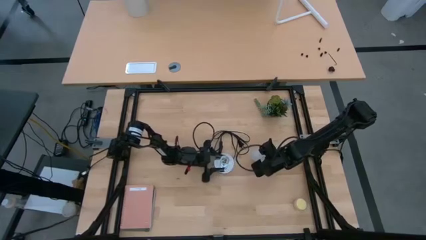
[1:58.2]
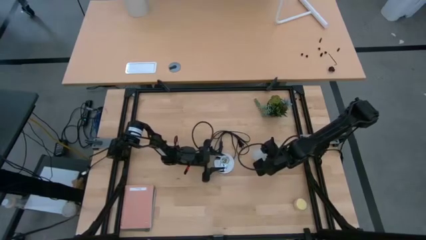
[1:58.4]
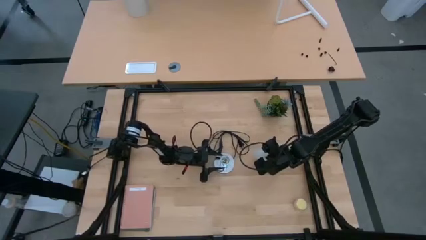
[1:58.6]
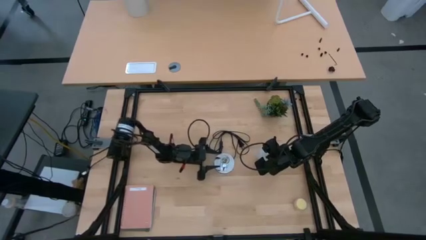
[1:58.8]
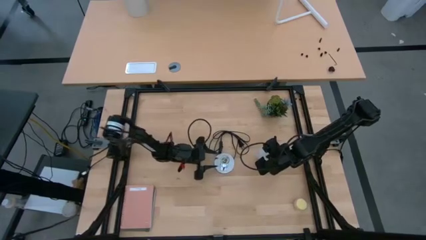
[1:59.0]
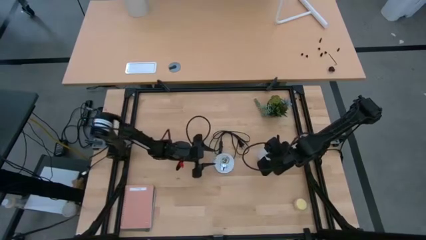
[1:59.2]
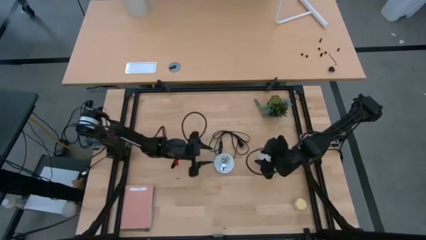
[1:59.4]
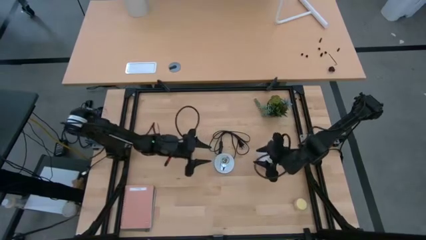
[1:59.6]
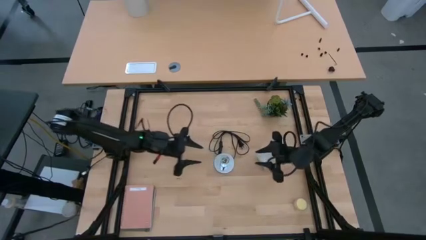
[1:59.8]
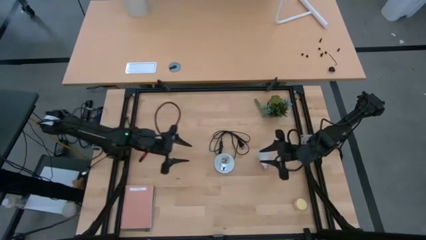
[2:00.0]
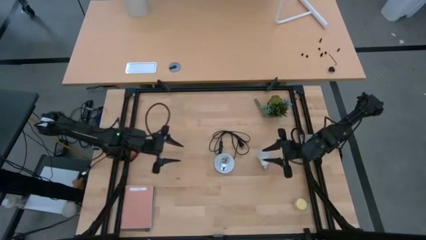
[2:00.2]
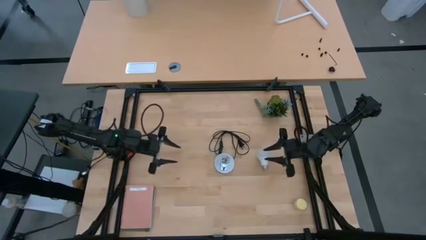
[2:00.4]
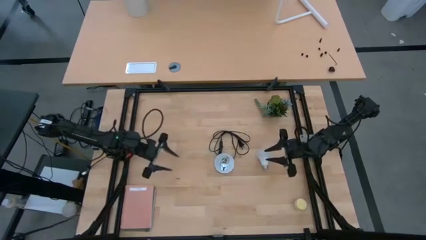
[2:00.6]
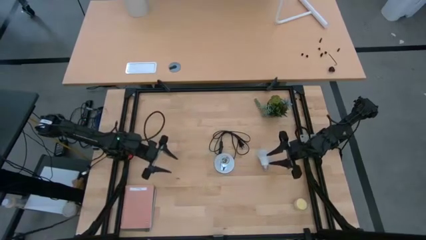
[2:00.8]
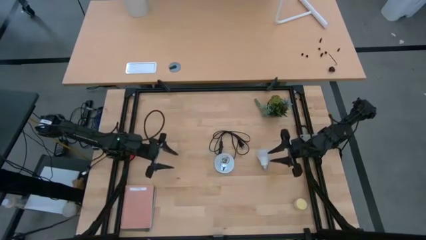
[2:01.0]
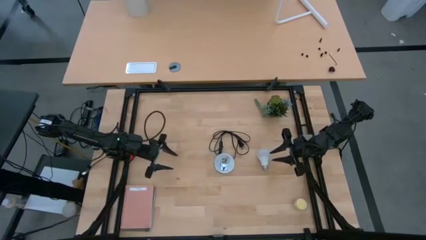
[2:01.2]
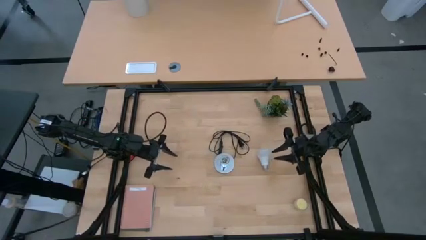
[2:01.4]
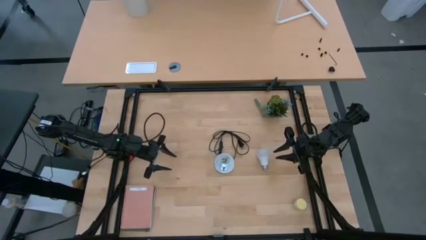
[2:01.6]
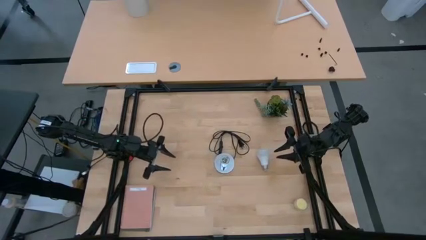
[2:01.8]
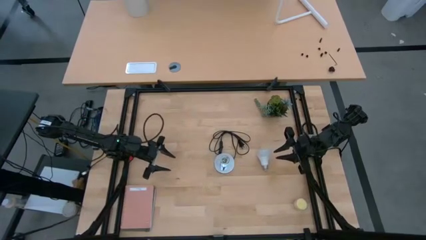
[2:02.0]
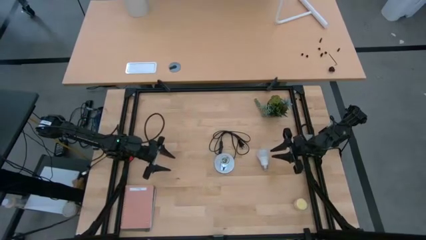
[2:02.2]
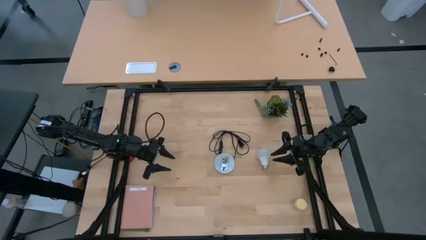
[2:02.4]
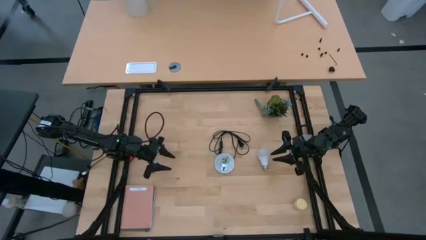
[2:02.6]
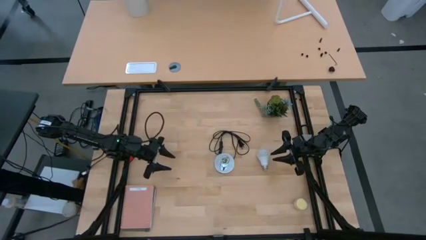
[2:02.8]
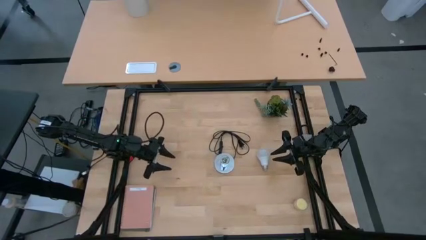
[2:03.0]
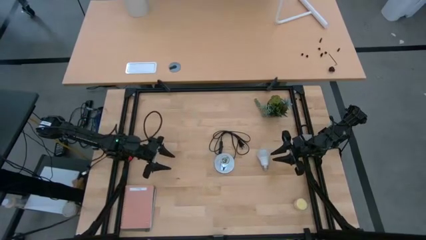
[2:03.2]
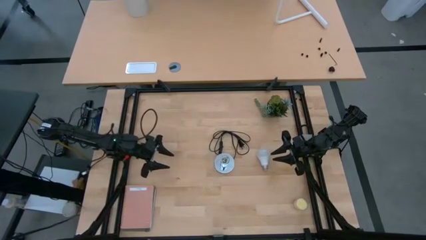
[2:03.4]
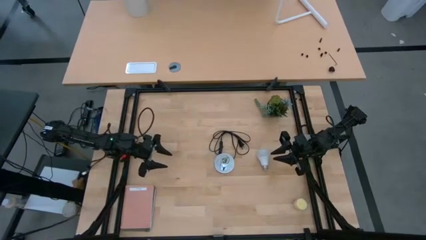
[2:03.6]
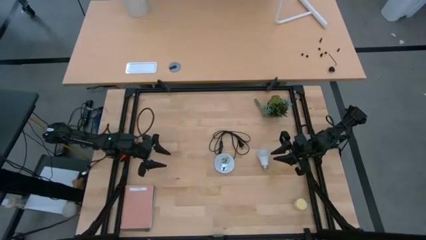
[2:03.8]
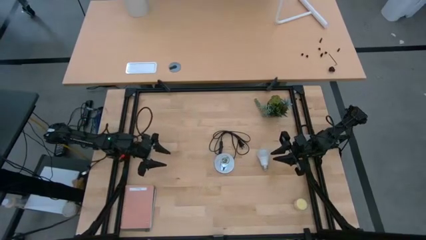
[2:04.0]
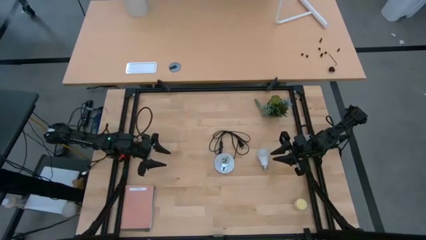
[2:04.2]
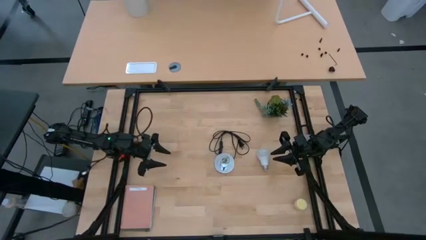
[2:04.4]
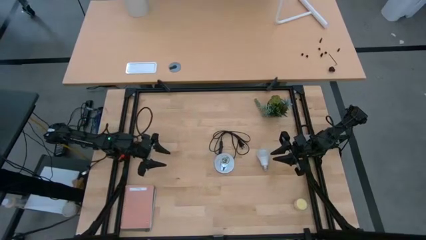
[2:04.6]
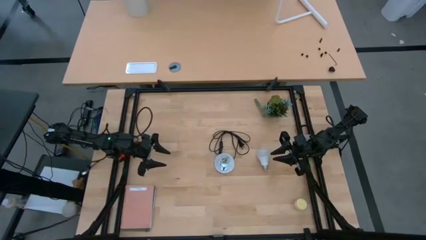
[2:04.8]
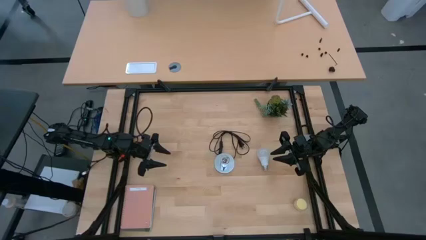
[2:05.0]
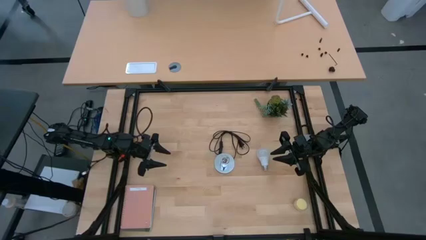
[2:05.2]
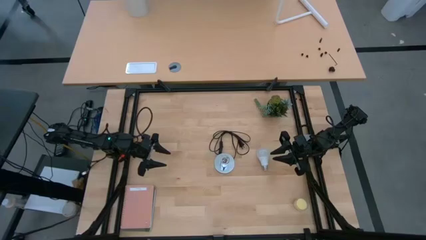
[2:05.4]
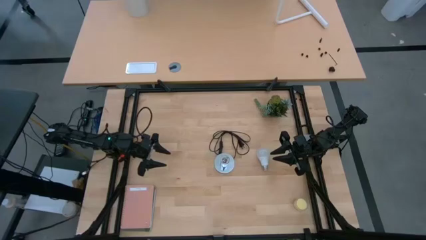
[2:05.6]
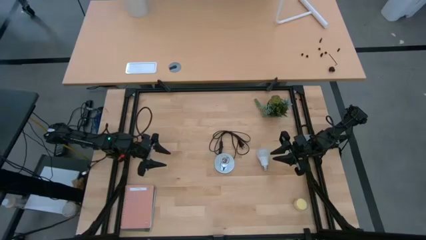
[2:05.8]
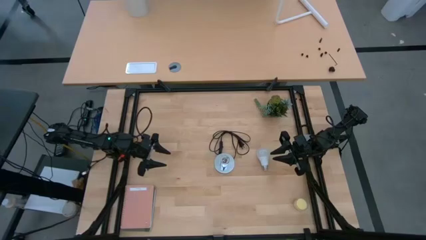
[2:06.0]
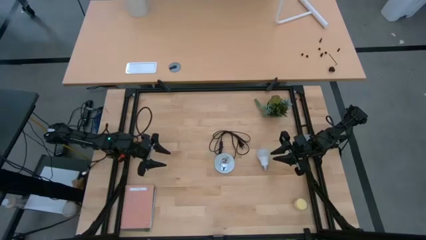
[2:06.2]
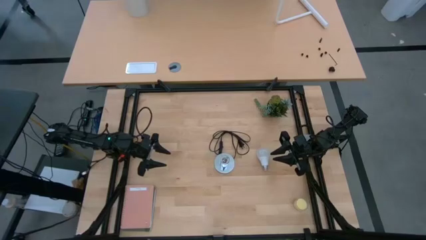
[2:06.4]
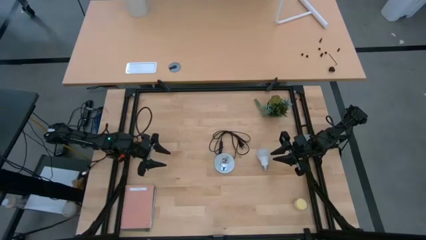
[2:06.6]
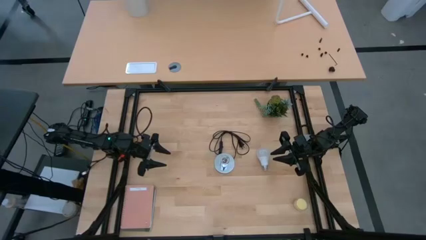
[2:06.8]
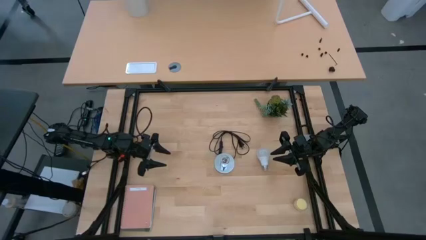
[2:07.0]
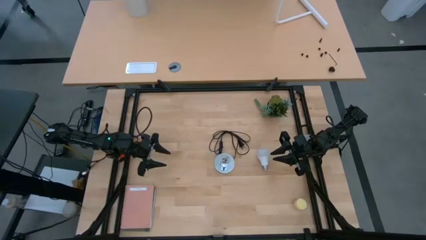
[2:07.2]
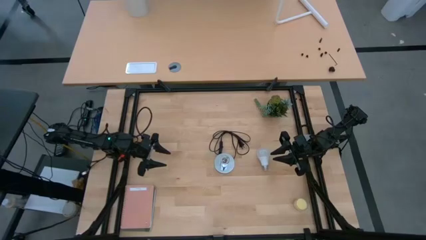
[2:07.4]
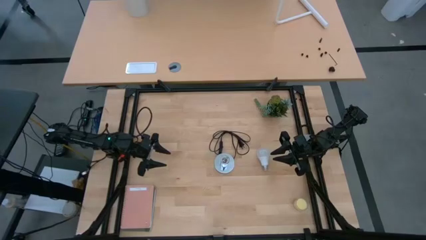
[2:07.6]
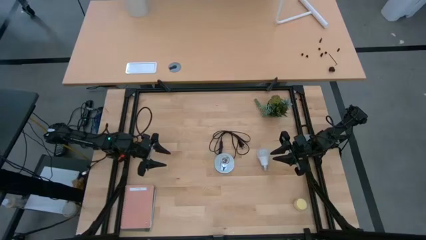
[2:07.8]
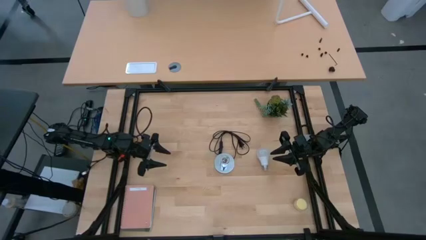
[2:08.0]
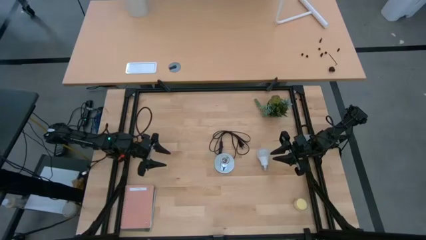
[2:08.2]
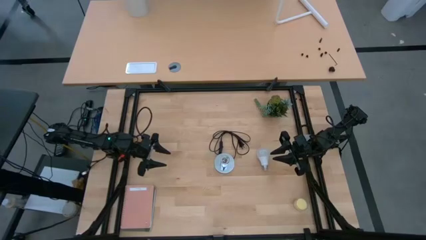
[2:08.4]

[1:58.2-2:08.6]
Task: Screw lightbulb
Return to Home Position

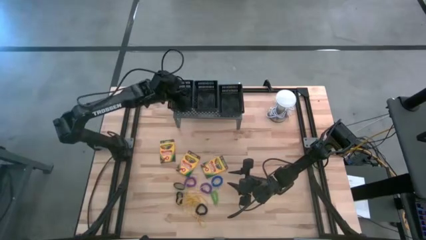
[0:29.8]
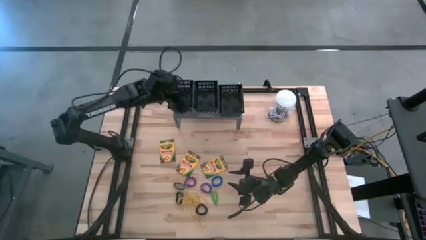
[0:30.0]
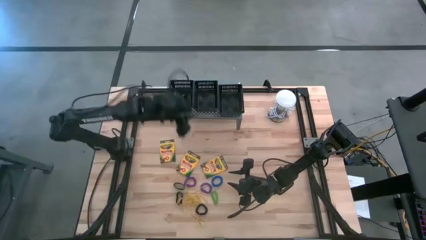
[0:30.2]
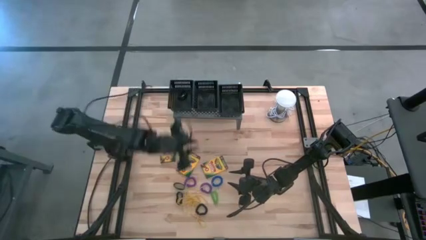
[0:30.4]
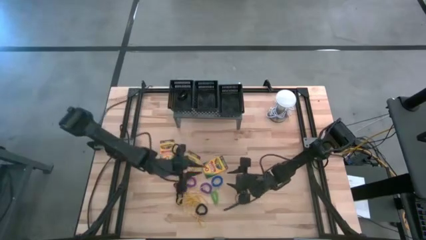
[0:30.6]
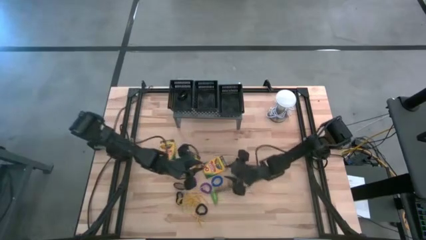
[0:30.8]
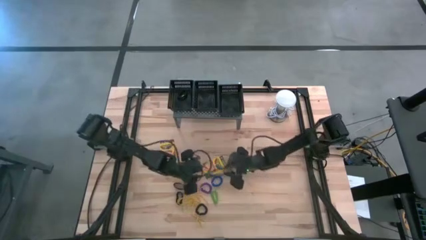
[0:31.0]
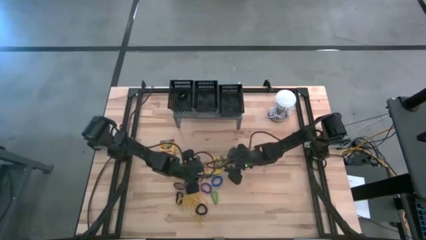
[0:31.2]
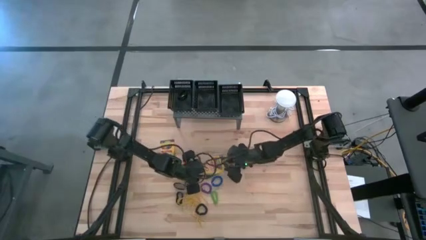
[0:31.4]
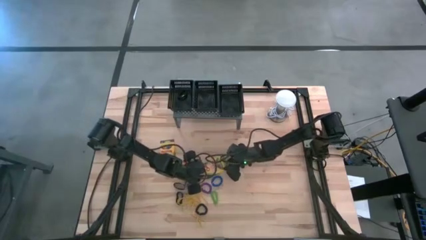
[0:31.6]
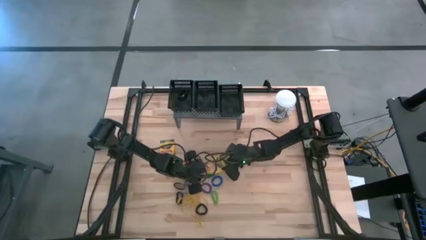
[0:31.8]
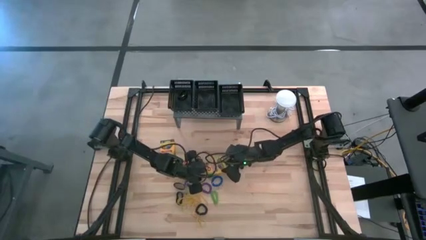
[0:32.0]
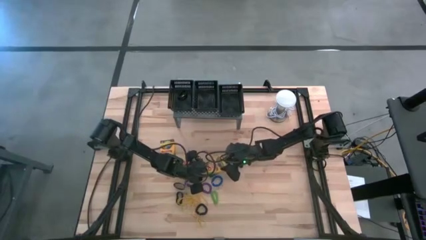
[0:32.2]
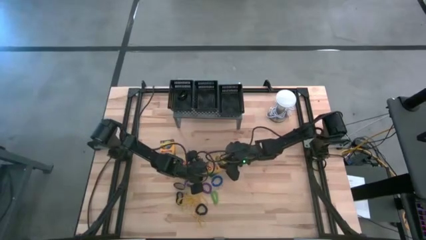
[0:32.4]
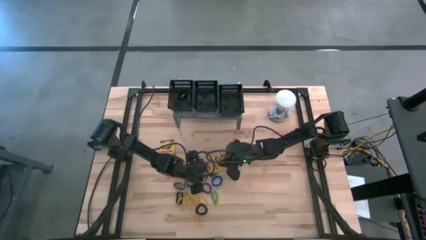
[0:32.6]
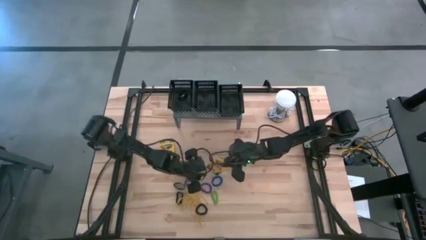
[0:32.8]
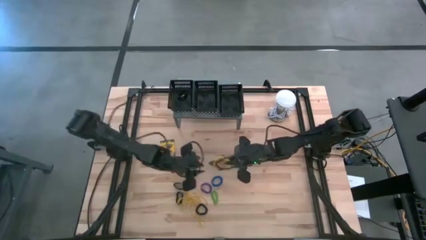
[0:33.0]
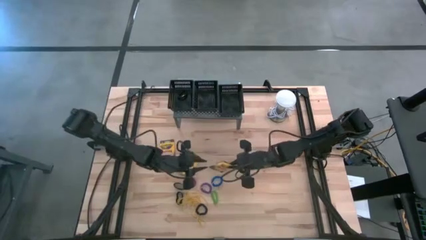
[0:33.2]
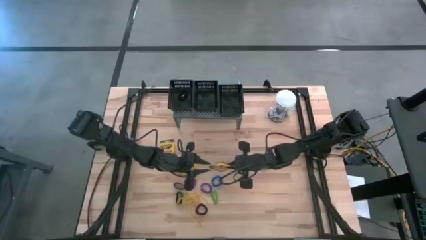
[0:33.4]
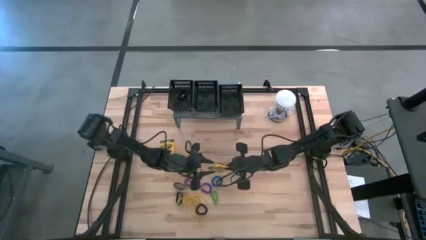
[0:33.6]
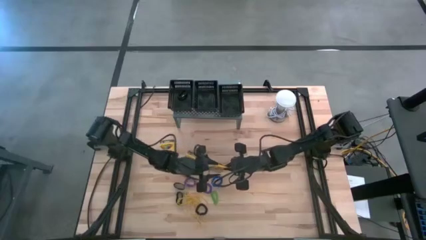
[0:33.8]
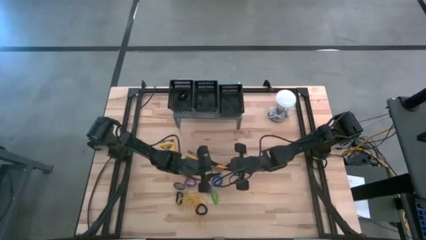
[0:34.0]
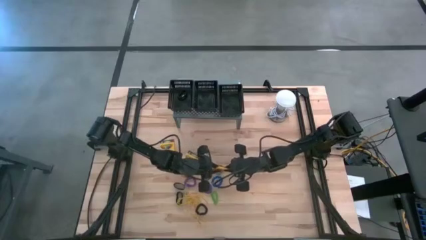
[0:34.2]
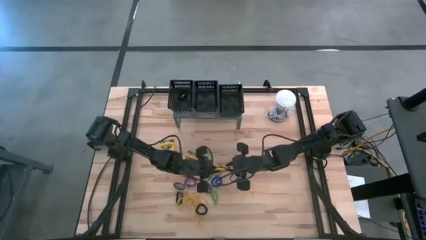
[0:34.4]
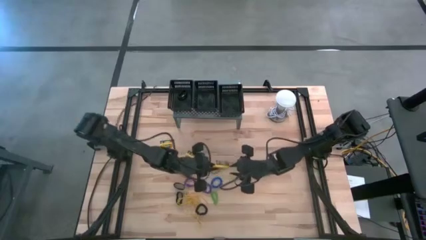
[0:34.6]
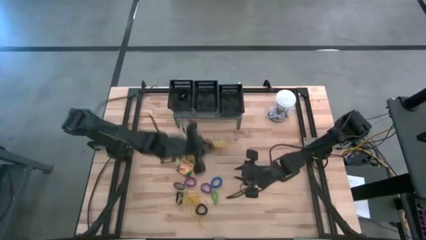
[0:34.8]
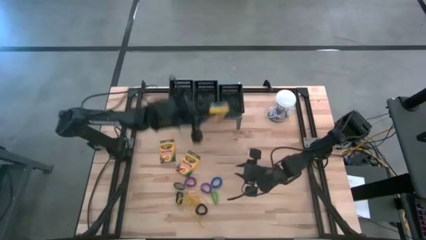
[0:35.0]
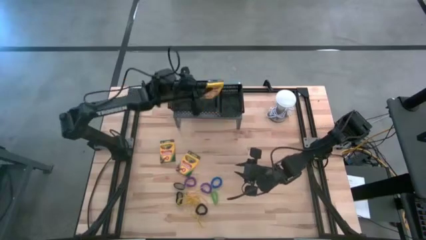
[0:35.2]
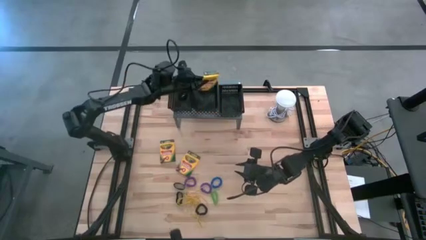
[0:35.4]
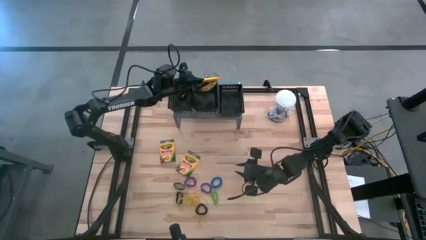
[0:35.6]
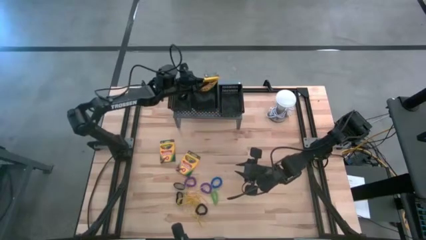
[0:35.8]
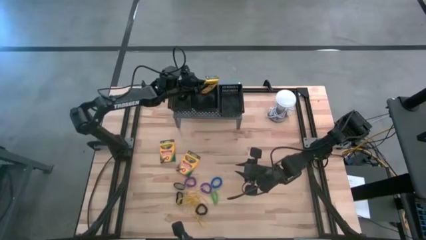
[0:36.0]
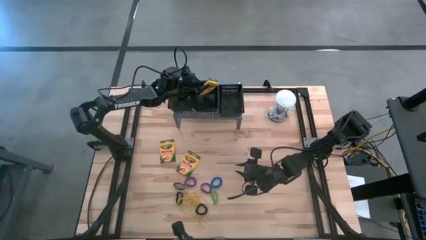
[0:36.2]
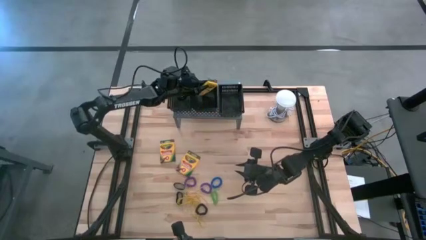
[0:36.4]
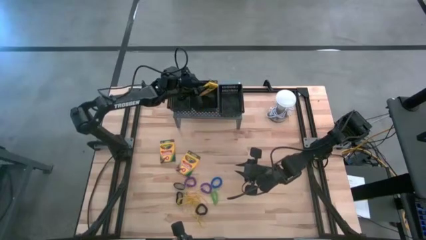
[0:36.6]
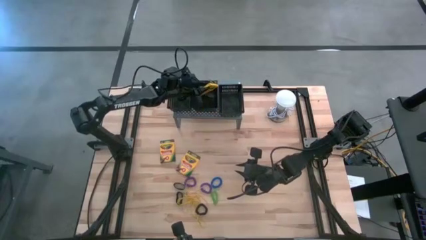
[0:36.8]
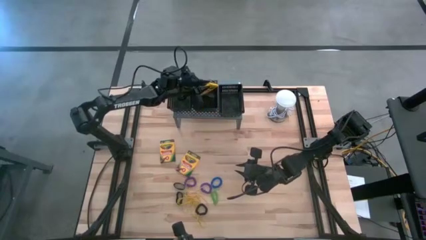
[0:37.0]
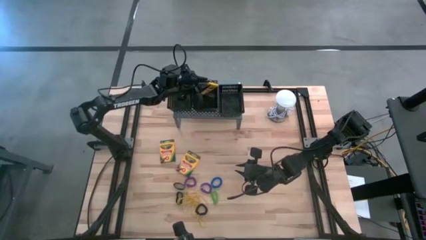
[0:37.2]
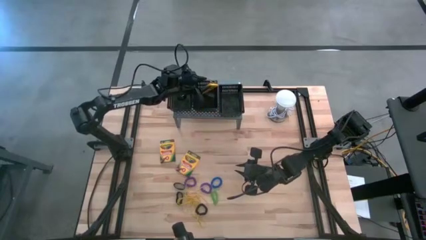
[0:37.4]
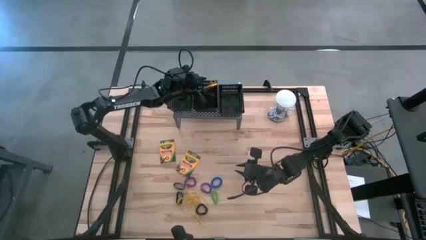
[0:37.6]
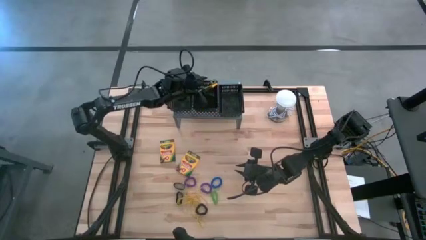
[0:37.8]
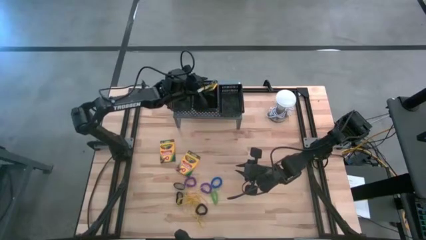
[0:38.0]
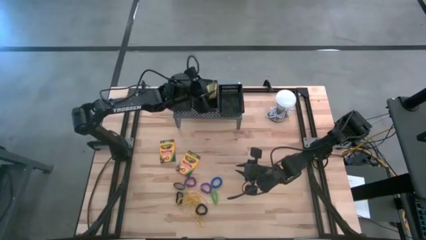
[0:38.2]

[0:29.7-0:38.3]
Task: Pick & Place Office Desk Supplies
Put the yellow crayon box into the middle black bin on the shelf
